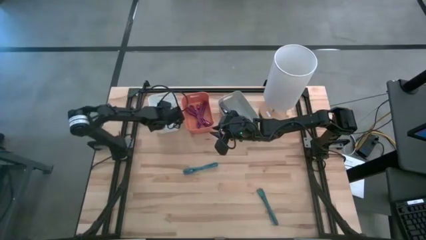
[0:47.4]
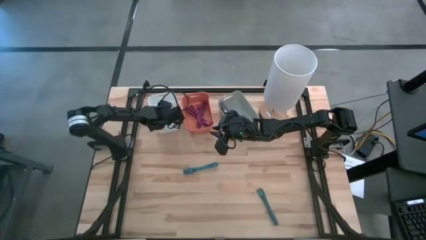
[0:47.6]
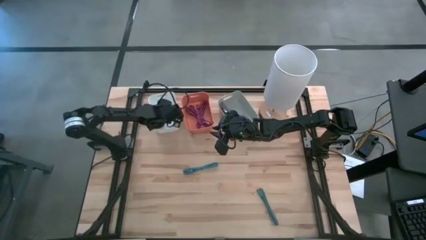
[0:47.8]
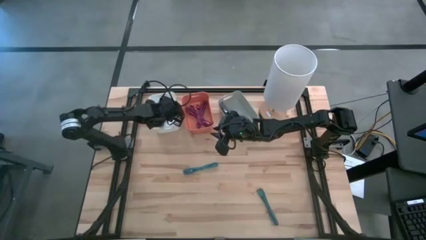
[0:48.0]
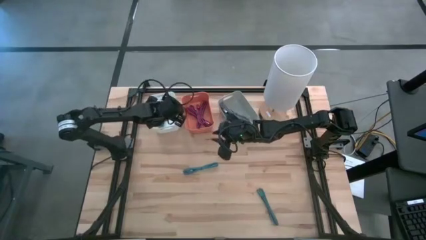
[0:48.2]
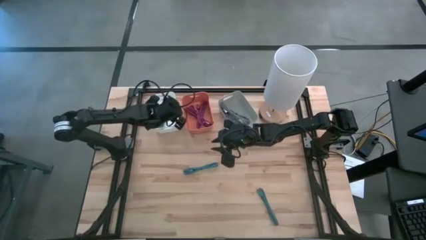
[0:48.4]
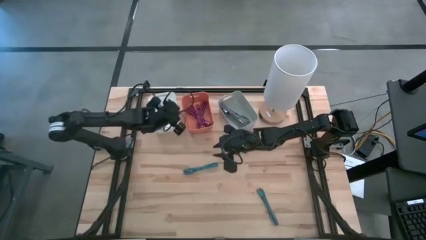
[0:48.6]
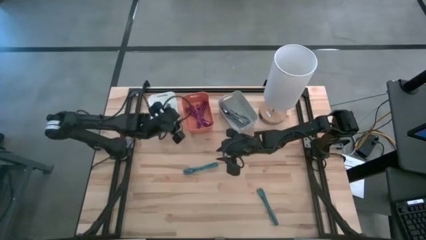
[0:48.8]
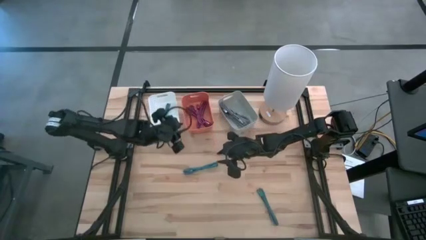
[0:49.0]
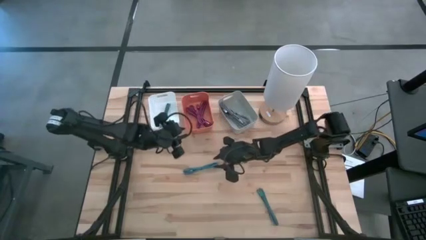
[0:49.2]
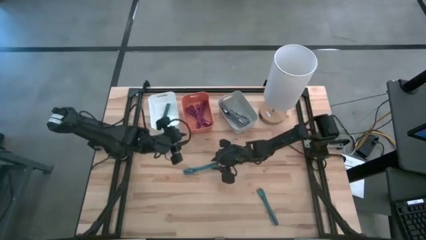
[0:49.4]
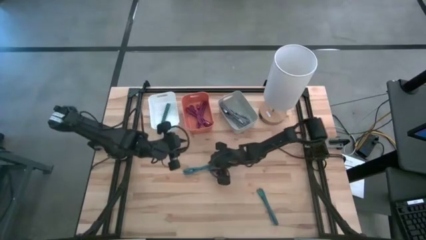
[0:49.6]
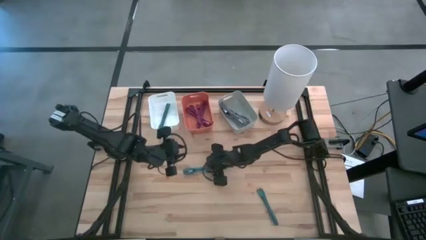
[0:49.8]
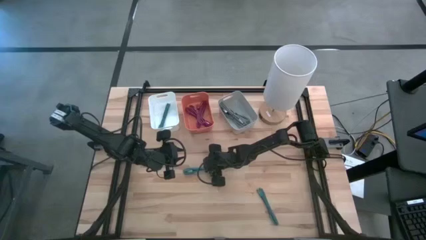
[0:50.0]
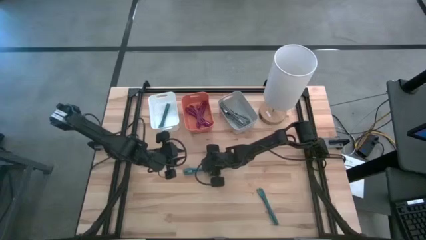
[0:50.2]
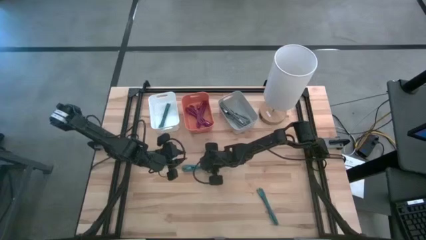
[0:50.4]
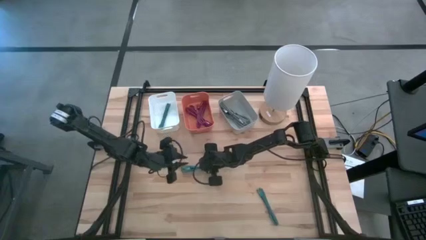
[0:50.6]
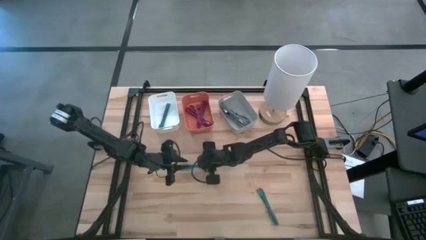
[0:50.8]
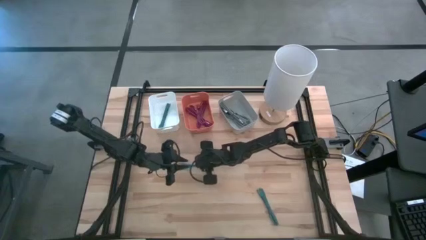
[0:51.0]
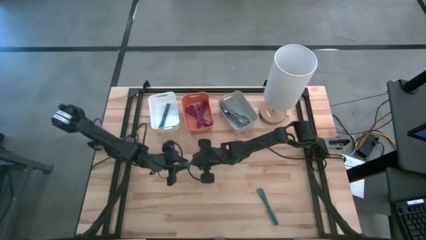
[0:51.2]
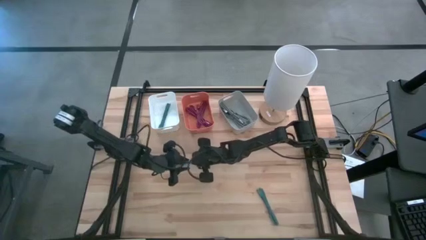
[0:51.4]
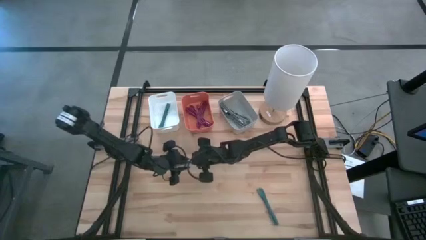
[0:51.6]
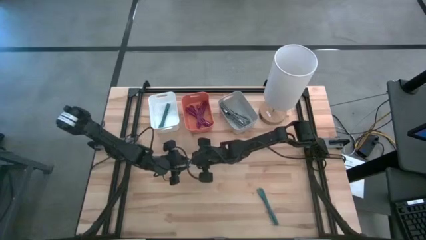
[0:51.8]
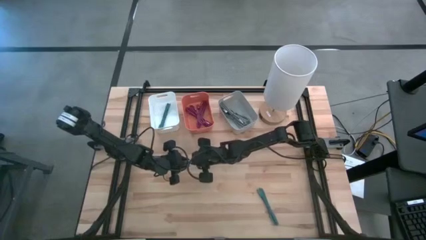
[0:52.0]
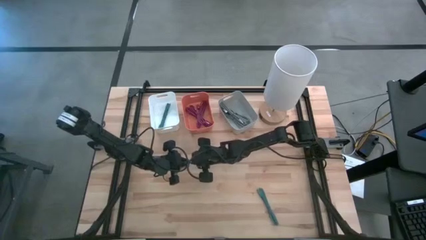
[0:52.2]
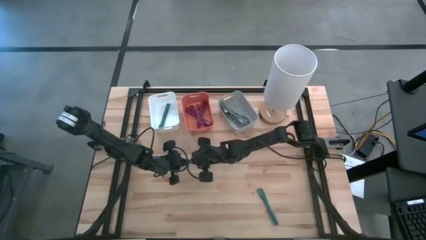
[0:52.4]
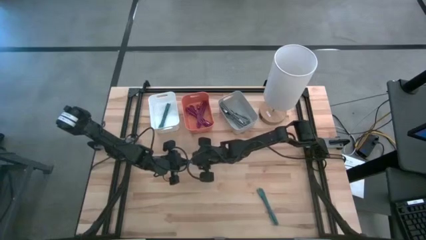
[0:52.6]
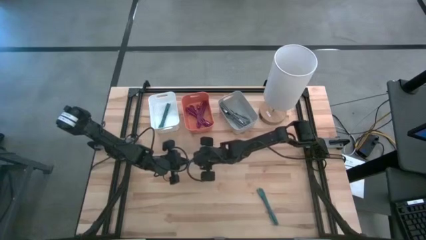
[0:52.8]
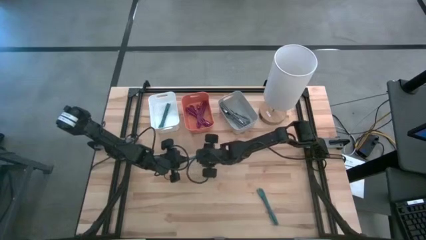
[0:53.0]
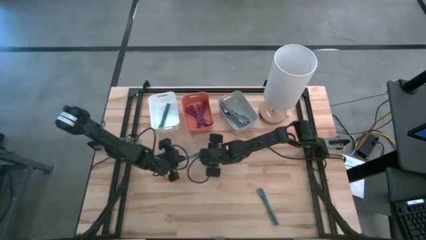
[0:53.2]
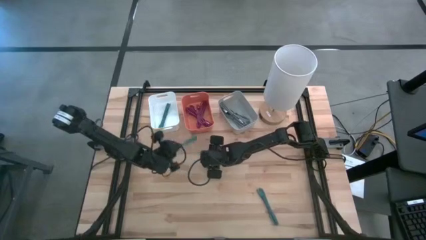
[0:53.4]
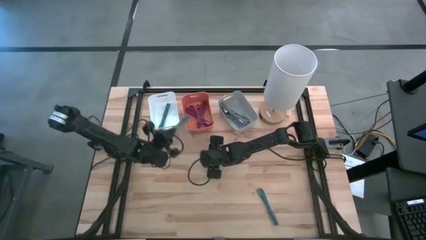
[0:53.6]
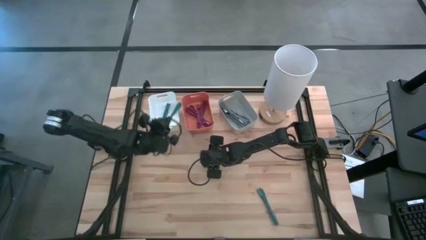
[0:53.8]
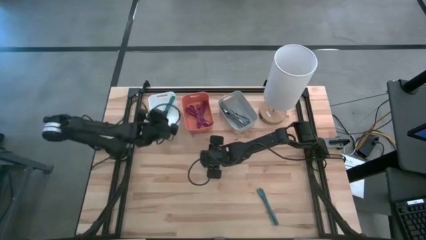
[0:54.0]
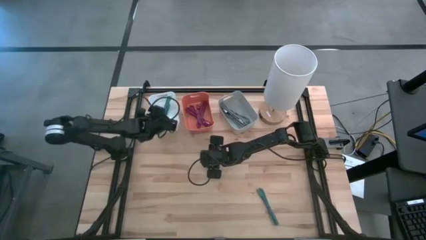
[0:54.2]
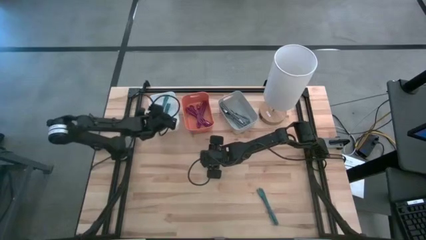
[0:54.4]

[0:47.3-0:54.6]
Task: Pick & Place USB Port
Put the top black and blue USB cable into the white bin

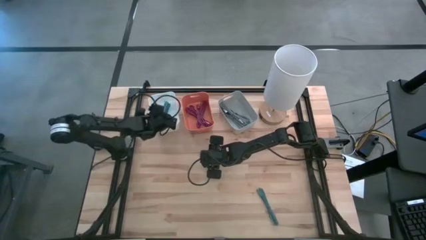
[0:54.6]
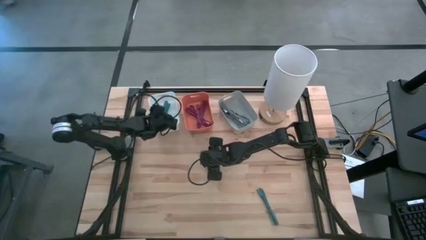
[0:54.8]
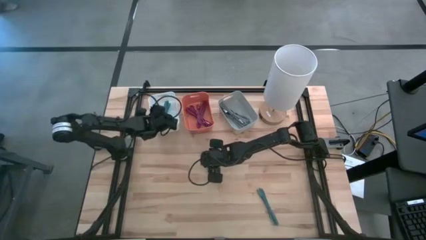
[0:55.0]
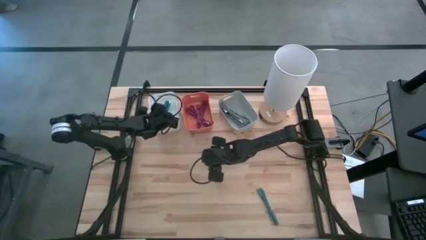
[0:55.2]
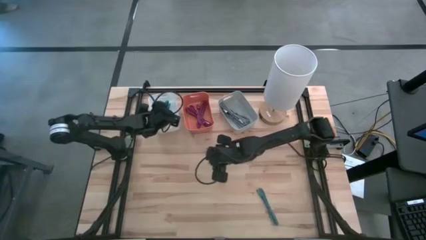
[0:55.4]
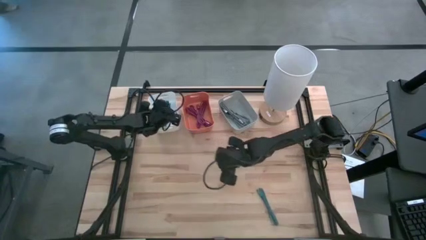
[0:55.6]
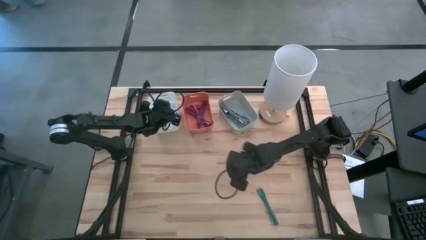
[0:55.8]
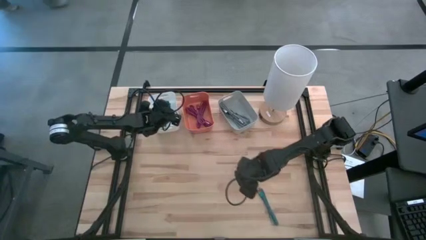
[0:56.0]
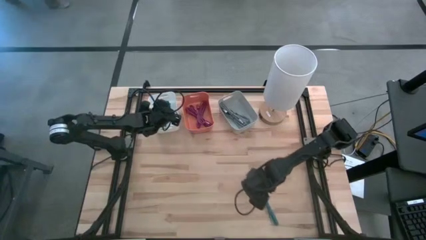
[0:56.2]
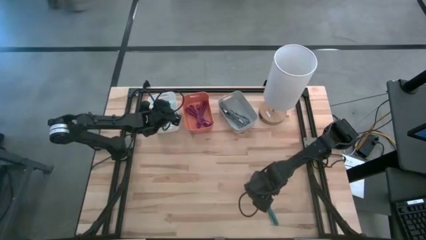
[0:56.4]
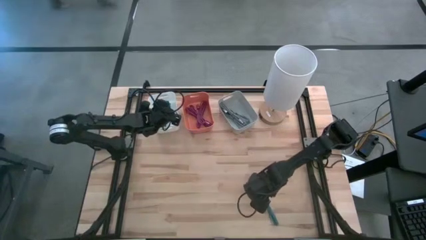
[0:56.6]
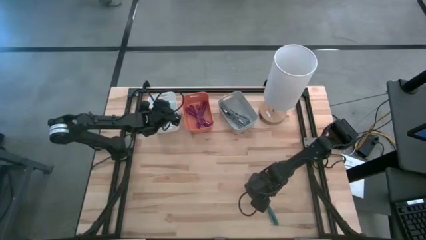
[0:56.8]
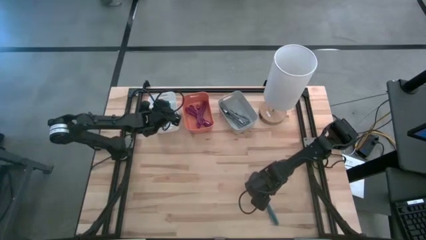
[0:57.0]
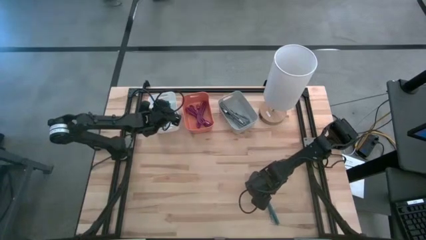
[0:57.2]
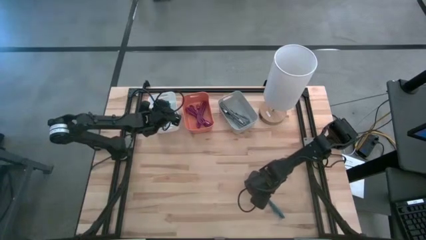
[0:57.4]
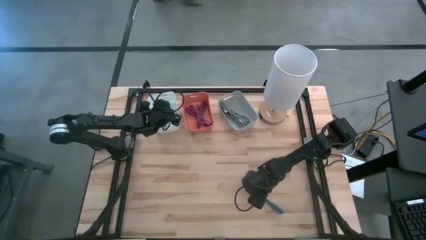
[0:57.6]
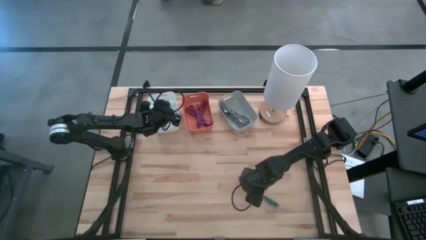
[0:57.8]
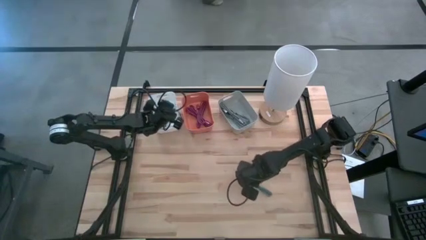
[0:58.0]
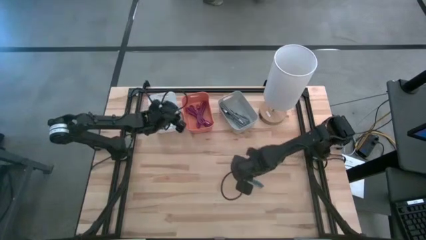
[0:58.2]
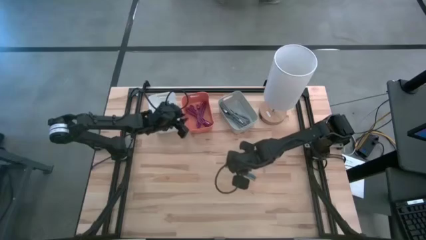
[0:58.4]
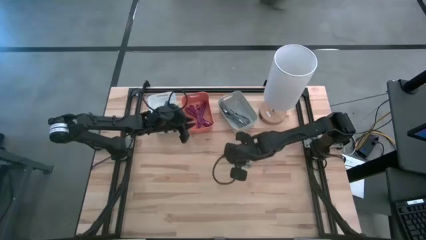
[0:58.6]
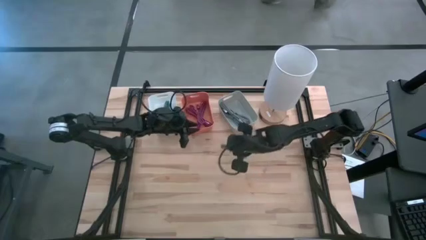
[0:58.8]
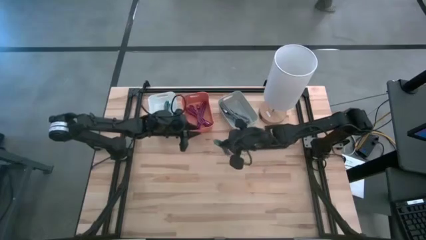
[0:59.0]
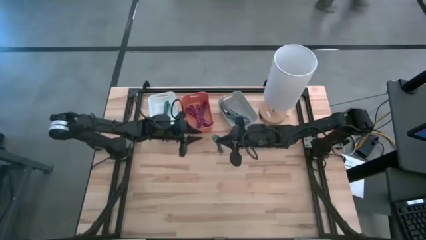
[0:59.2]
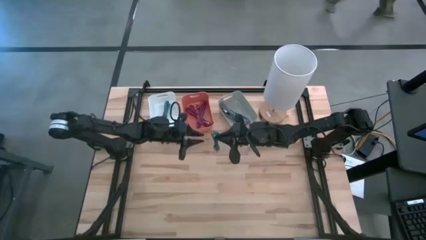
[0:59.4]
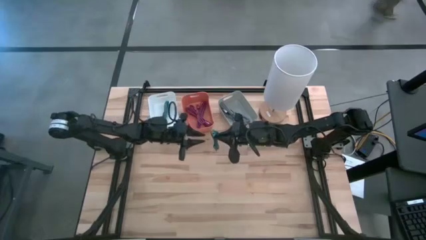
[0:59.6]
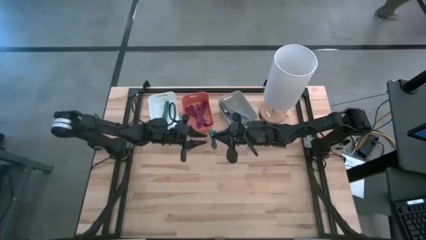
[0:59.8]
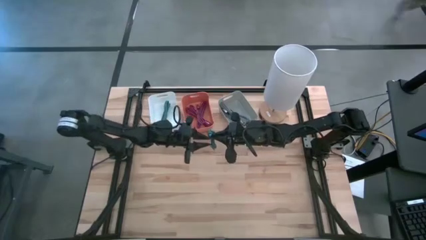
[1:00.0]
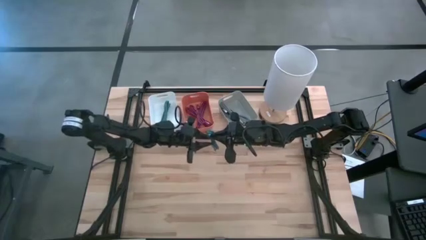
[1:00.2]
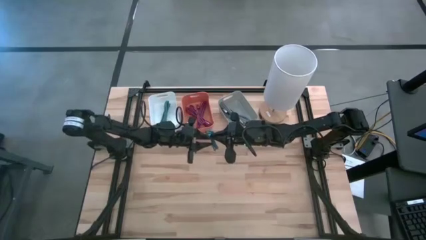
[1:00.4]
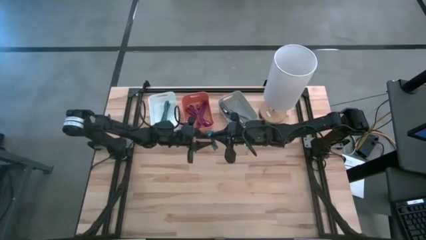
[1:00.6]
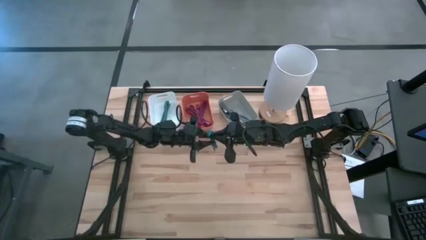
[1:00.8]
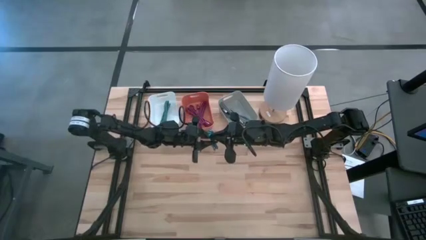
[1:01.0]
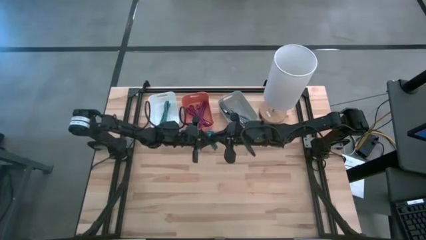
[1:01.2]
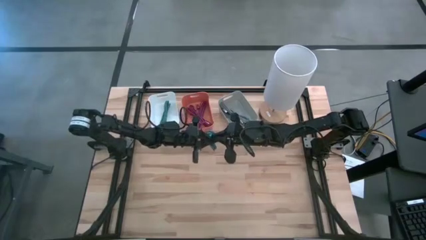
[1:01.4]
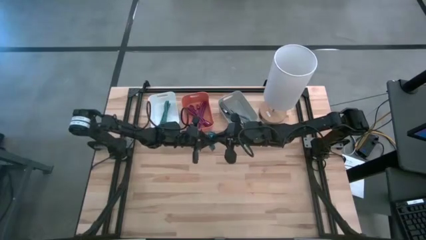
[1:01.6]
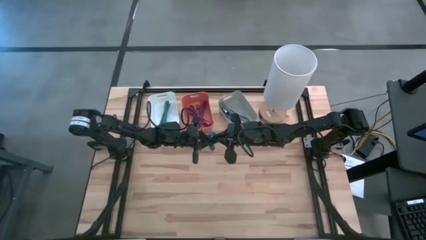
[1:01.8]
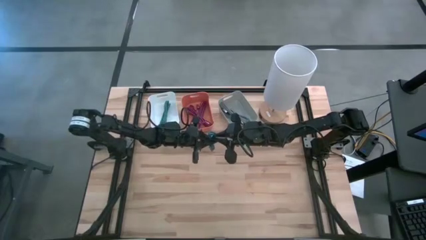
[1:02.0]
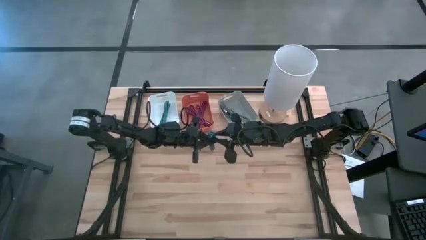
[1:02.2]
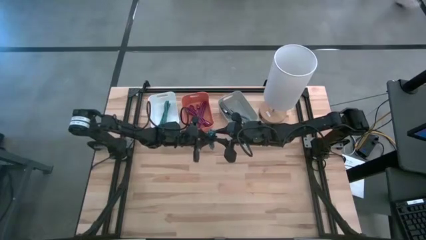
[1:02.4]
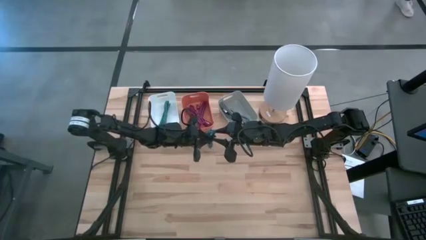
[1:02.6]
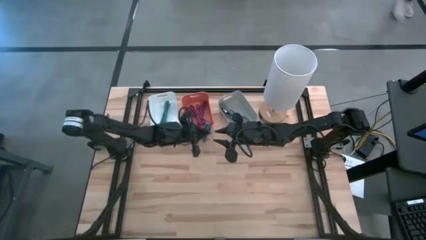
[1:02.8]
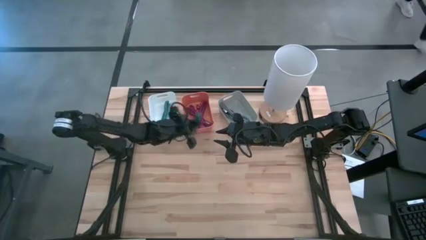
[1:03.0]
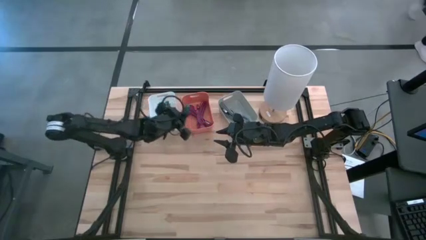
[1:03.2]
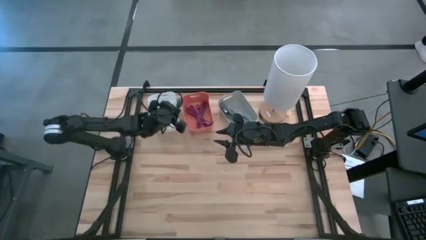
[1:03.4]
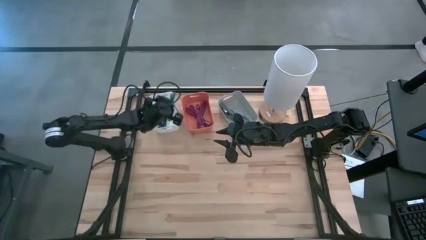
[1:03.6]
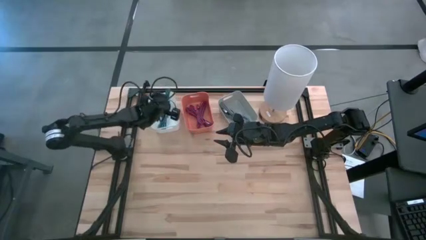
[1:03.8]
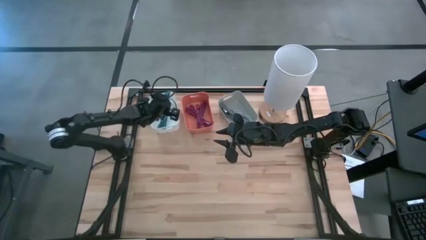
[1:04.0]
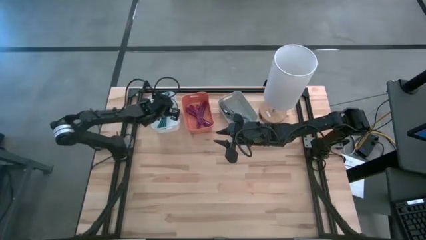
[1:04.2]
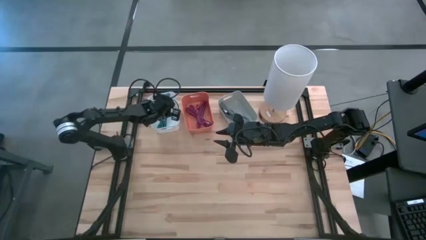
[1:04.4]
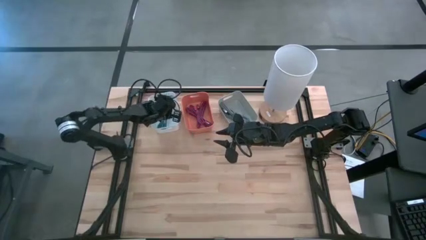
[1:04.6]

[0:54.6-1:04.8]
Put the black and blue USB cable into the white bin
